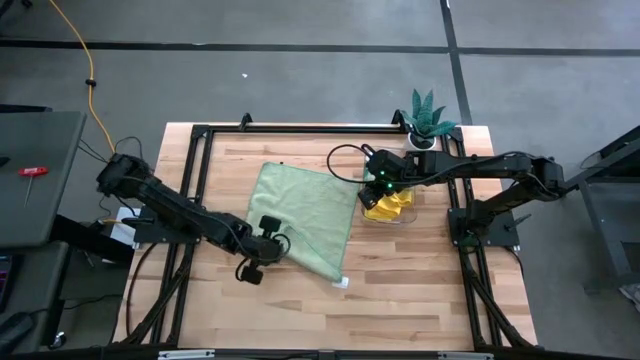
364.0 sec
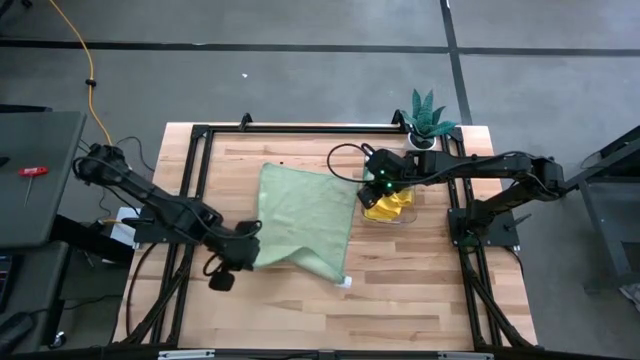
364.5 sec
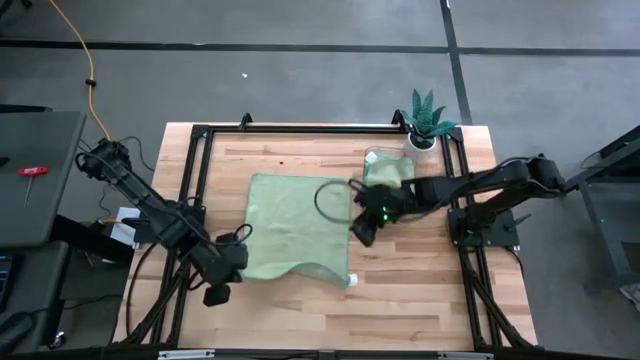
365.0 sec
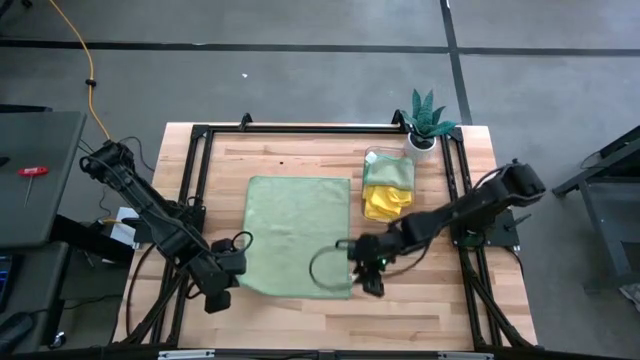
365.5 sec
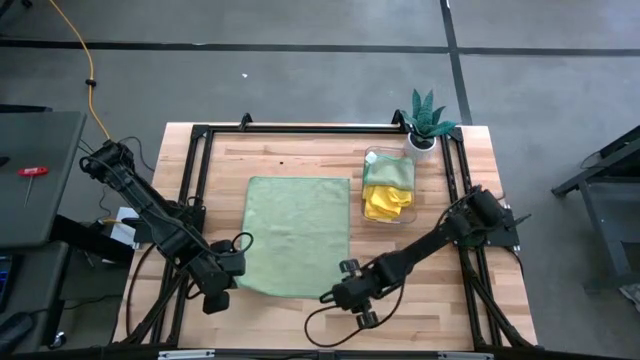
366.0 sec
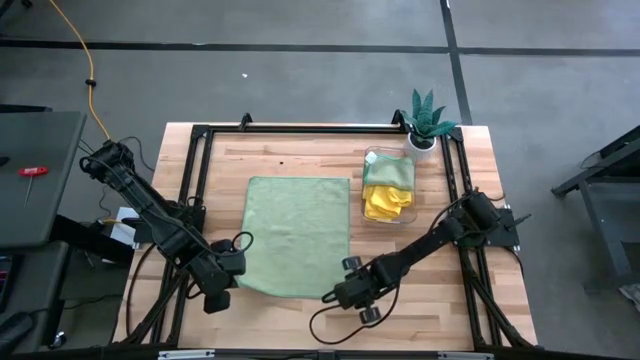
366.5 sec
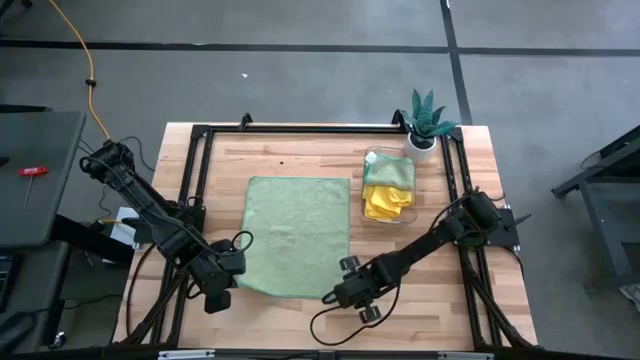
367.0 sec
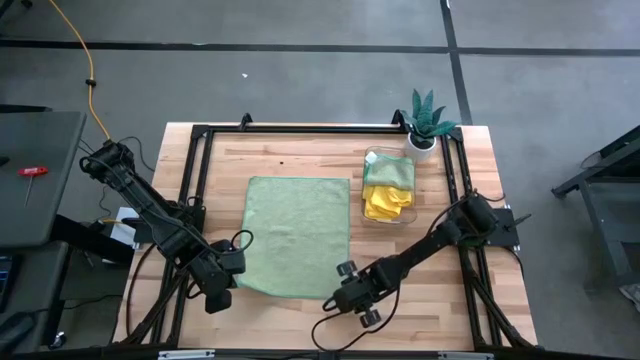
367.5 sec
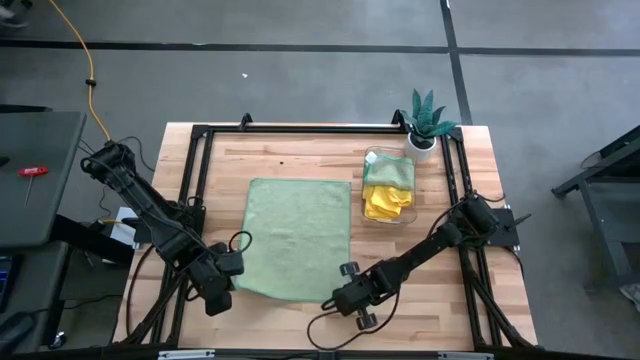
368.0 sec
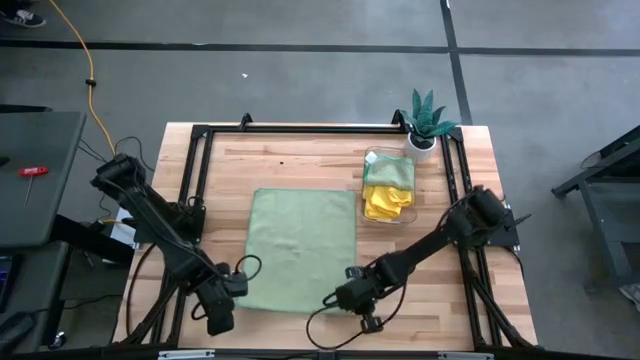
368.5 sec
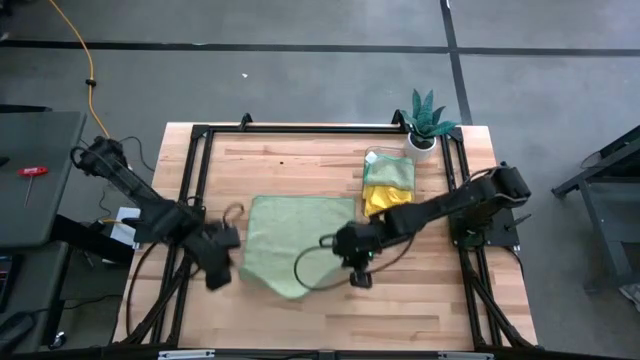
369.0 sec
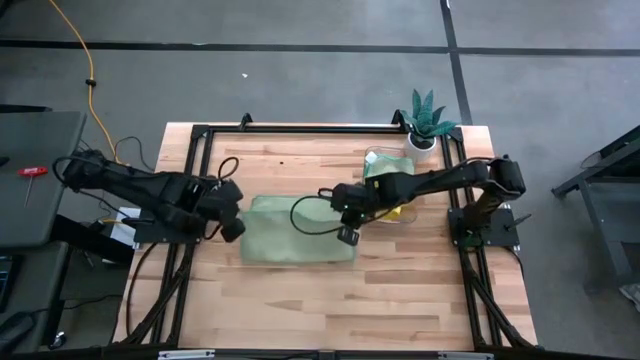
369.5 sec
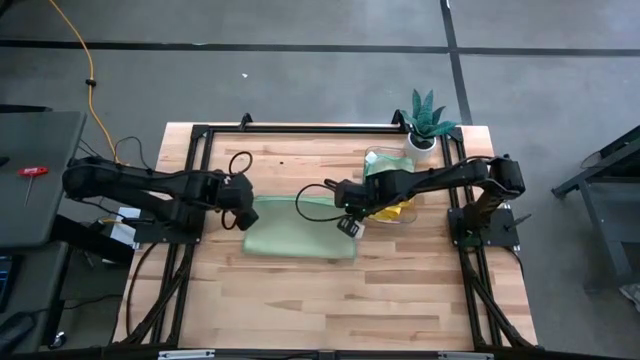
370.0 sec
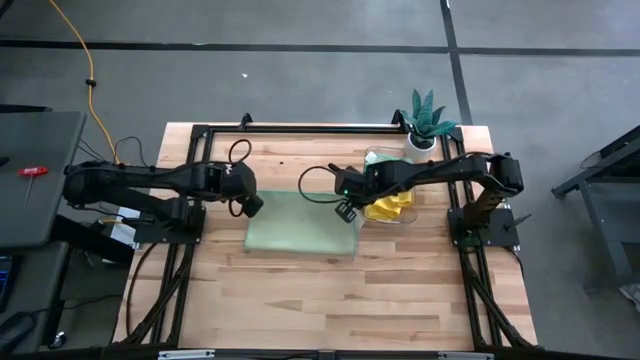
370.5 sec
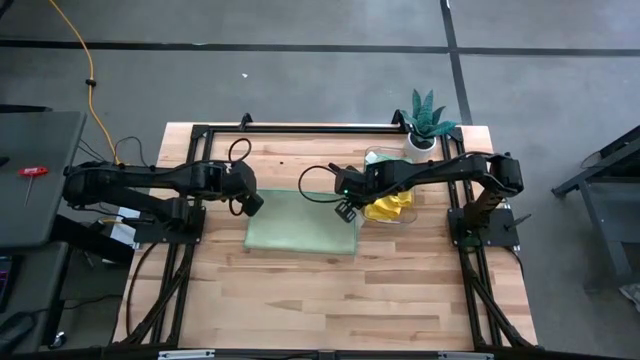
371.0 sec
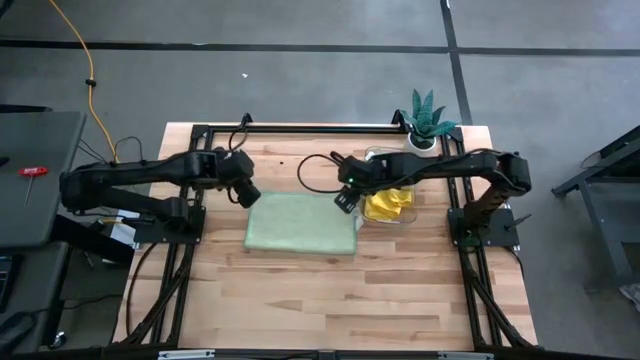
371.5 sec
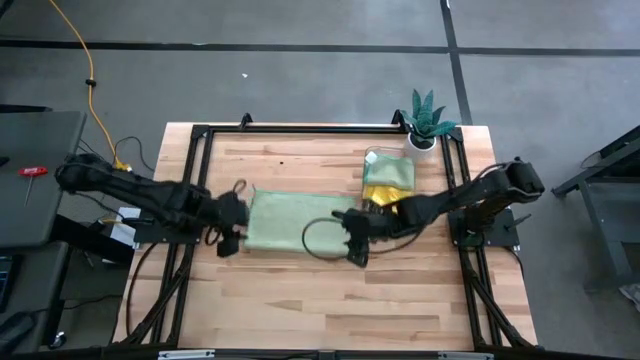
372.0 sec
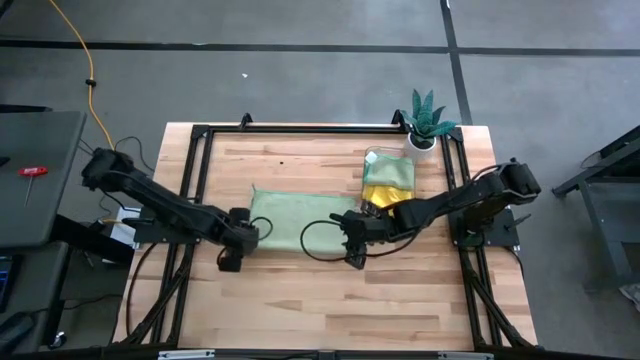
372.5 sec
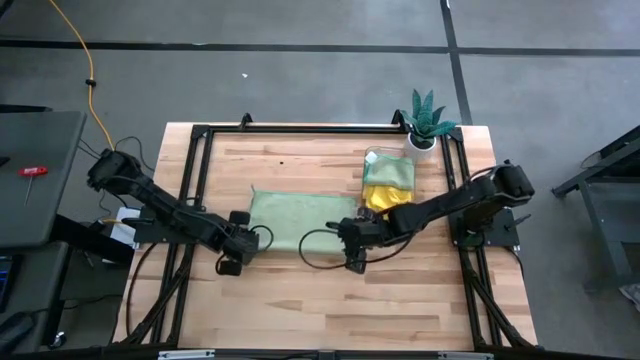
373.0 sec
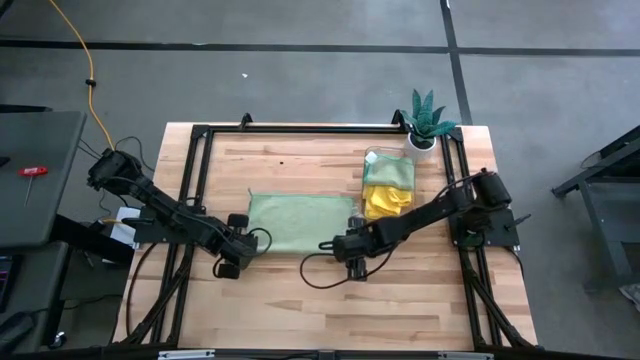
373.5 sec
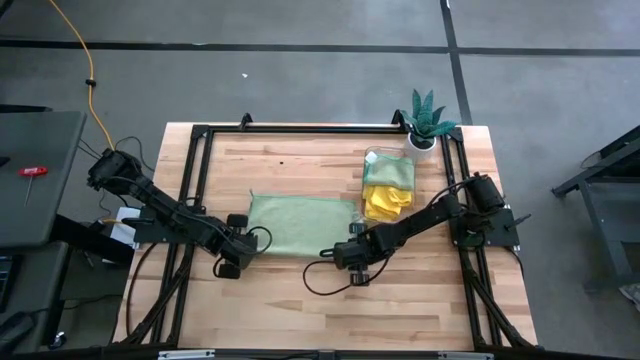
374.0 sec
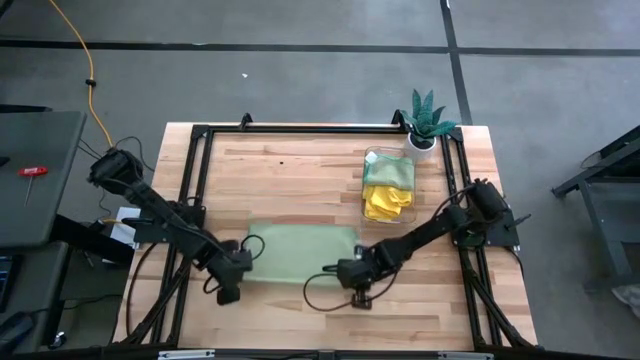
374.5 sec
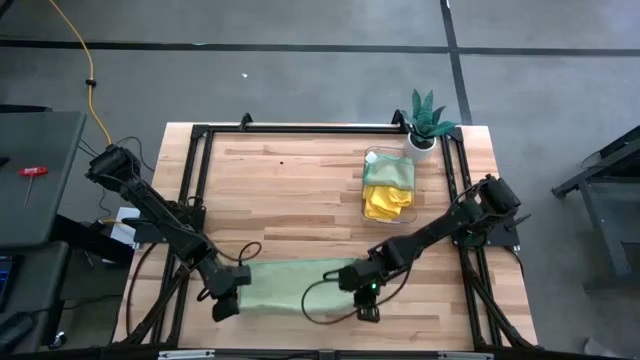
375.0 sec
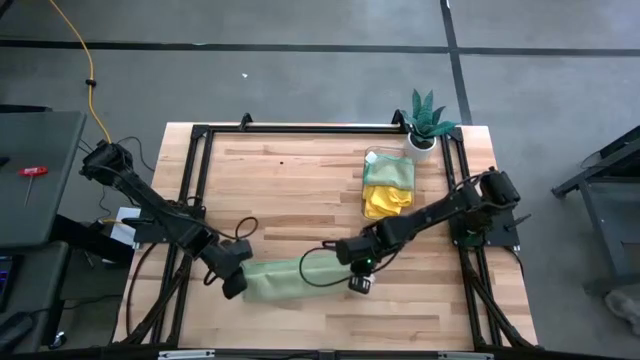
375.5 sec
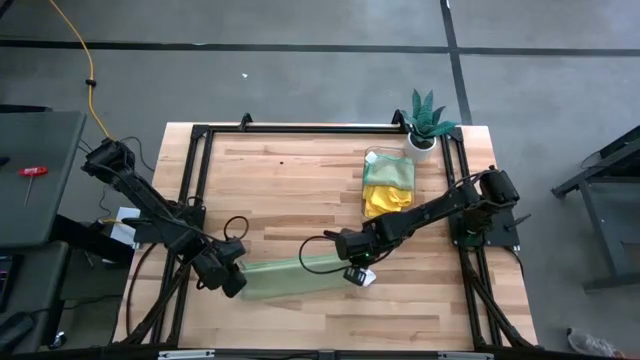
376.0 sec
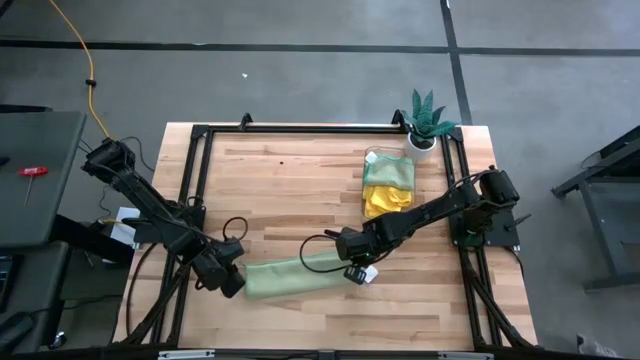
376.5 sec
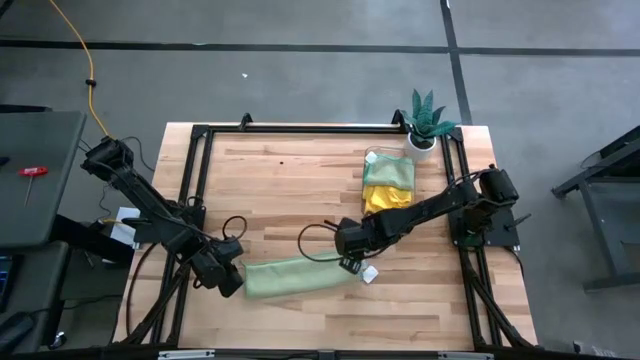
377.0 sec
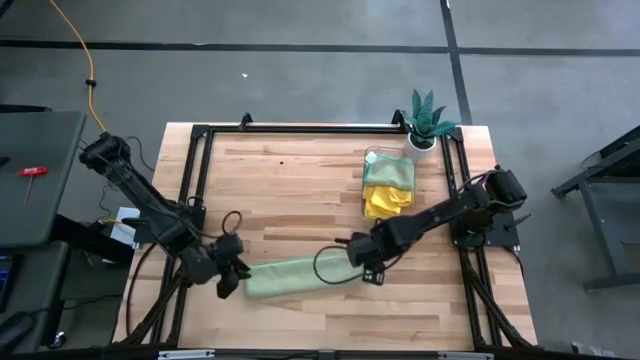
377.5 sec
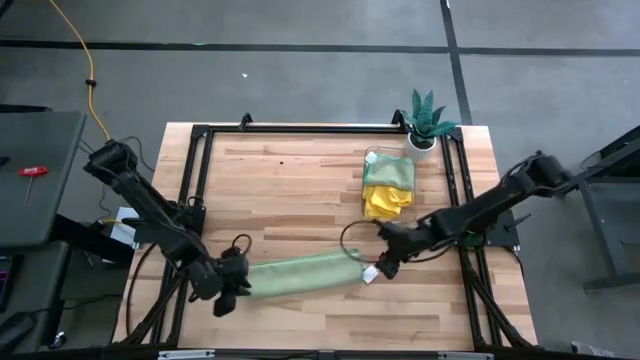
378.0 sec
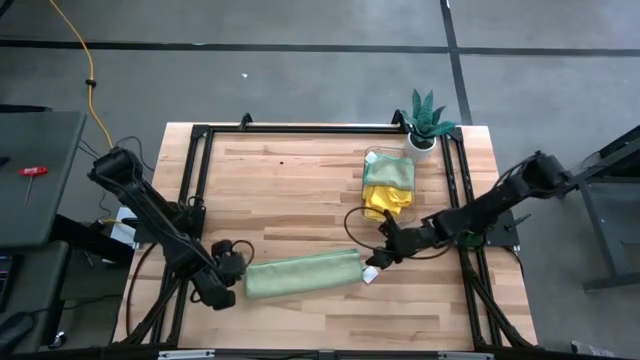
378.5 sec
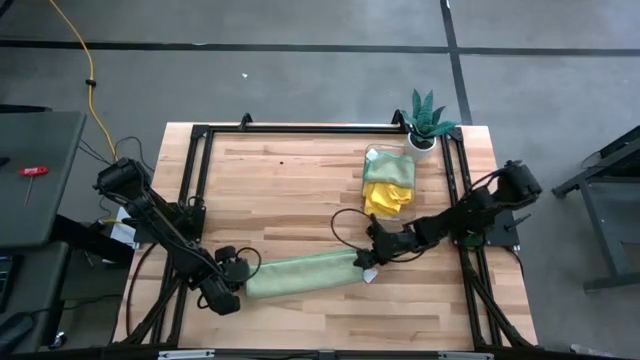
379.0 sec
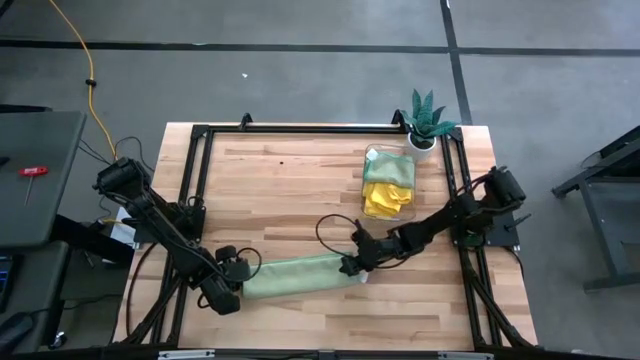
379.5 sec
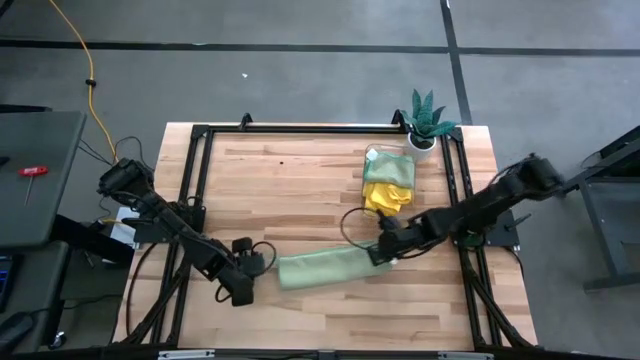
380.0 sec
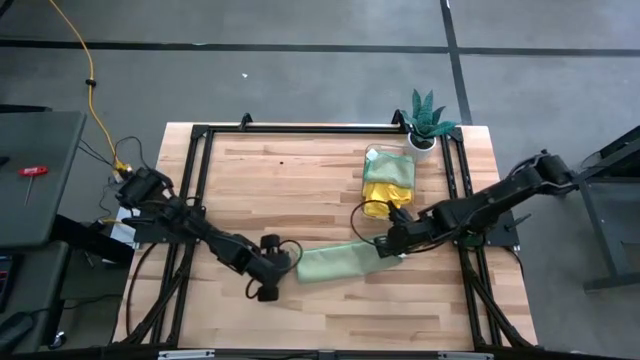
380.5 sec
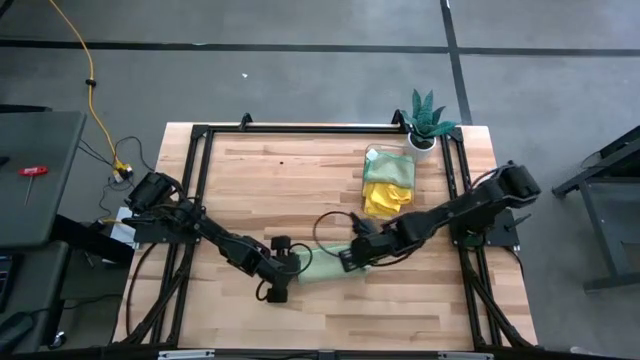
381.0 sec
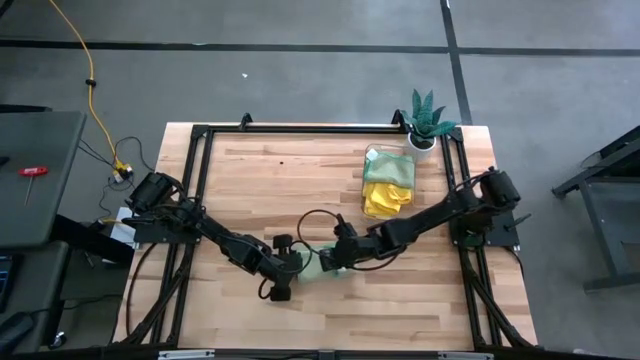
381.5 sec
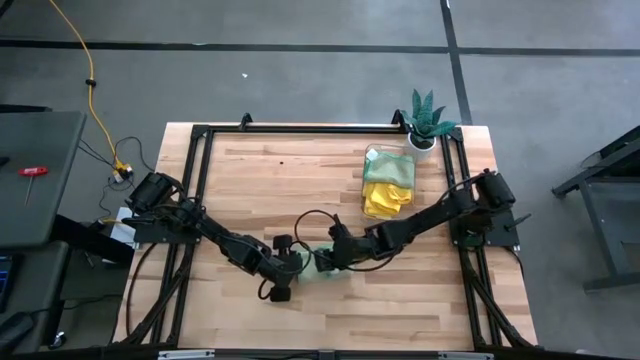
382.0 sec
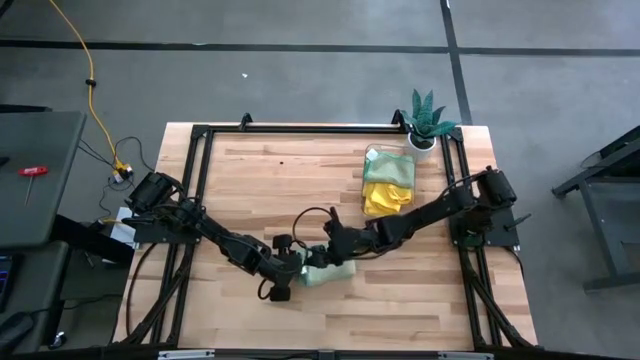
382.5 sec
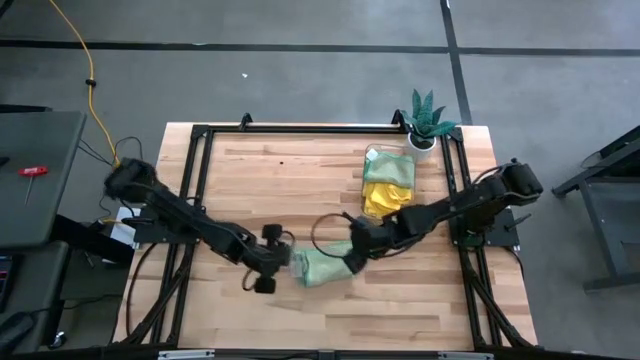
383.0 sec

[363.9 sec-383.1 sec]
Task: Fold microfiber towels
Fold the green microfiber towel

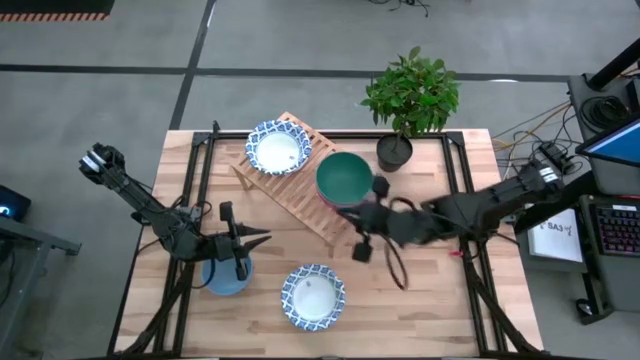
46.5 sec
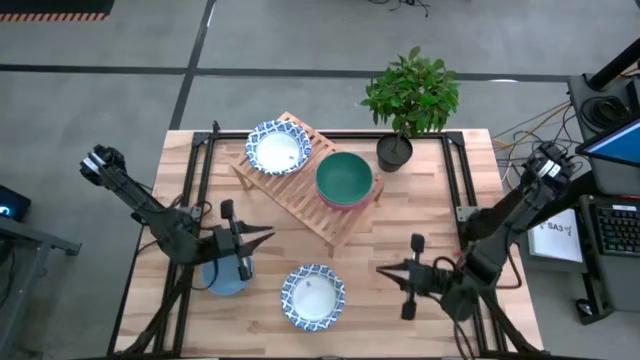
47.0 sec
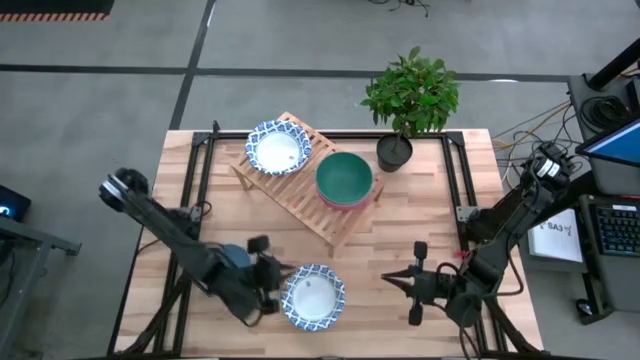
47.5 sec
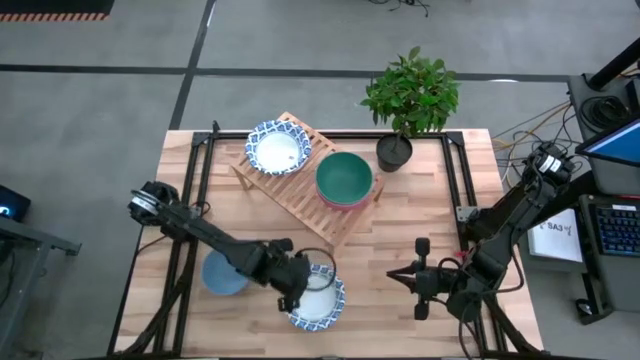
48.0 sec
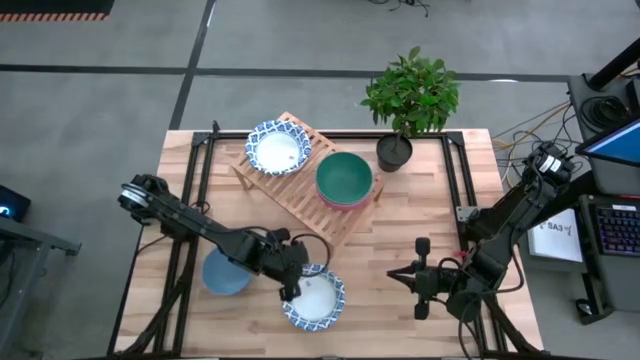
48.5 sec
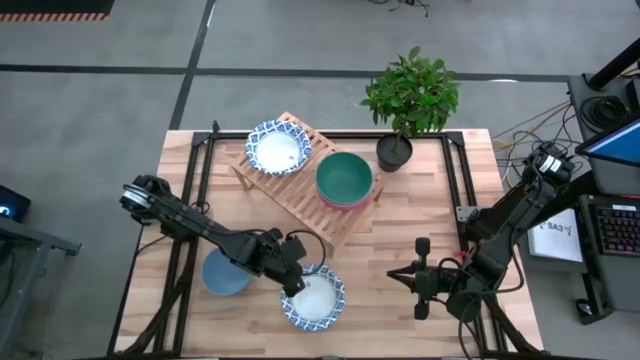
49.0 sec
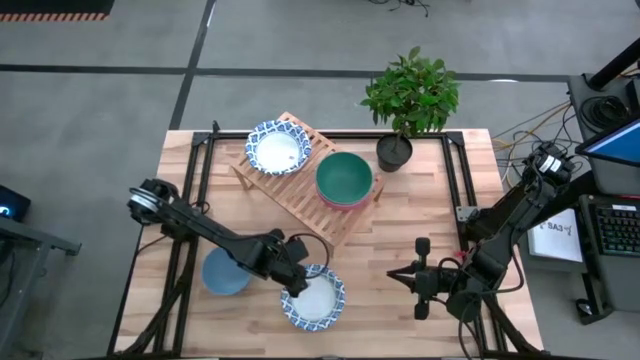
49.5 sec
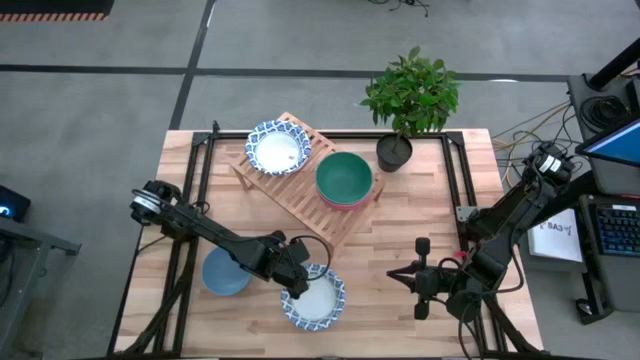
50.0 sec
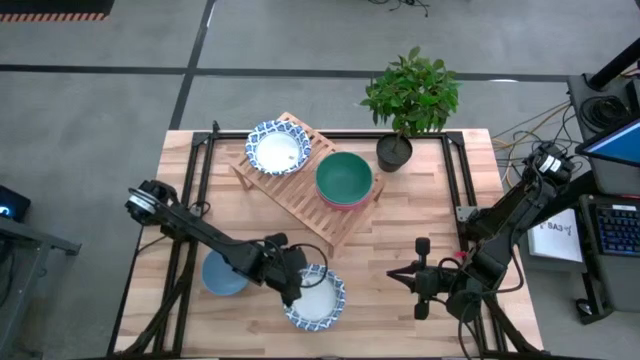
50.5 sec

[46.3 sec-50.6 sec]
Task: Place and stack bowls onto a shelf
Stack the white bowl on top of the white bowl on the shelf
